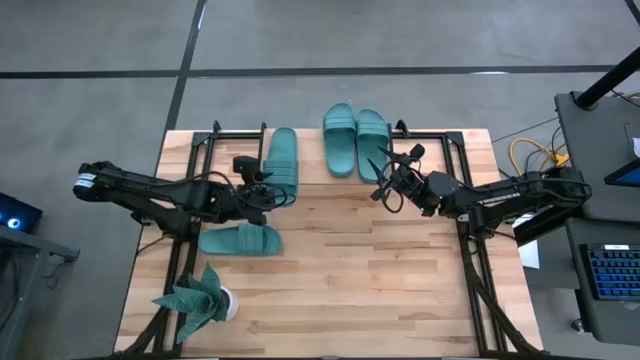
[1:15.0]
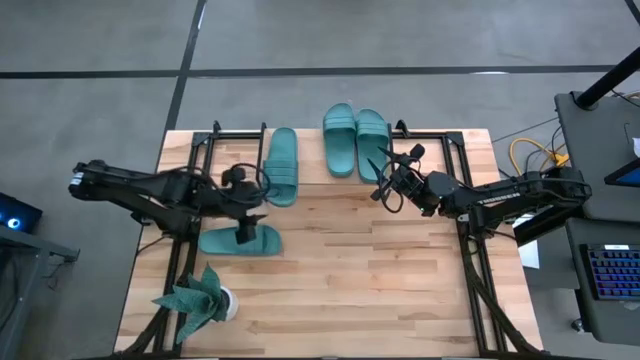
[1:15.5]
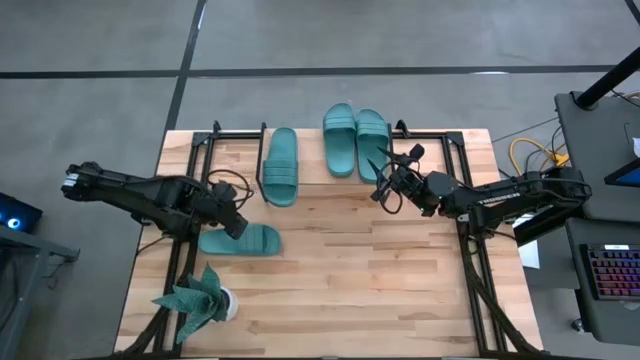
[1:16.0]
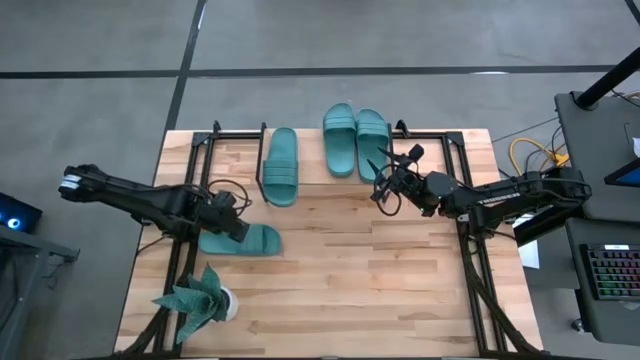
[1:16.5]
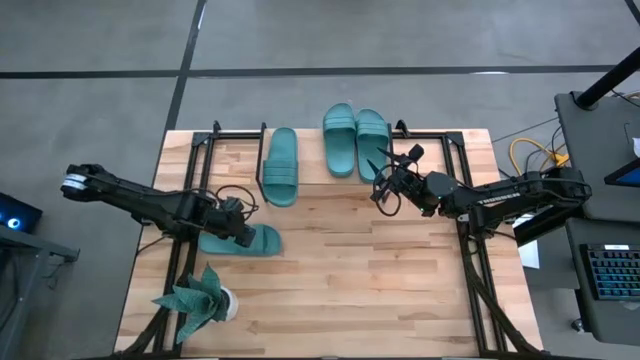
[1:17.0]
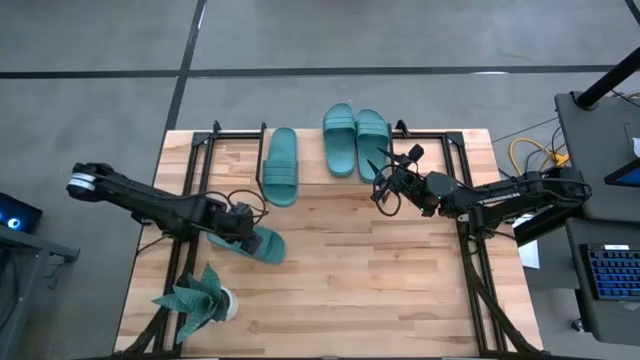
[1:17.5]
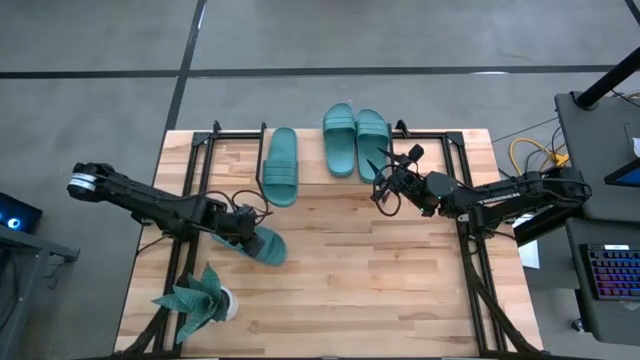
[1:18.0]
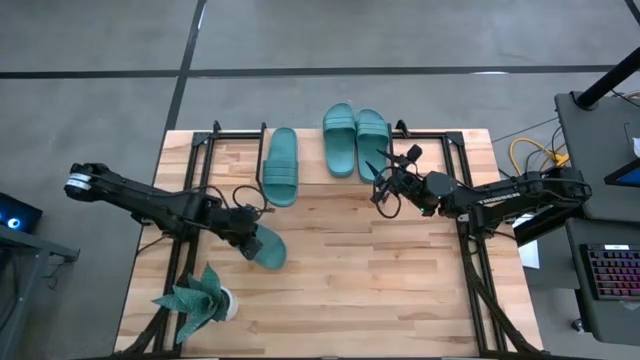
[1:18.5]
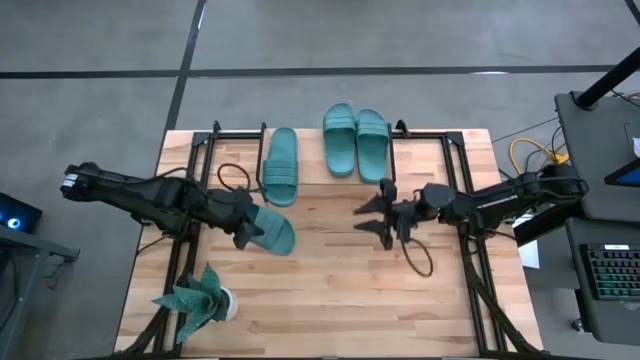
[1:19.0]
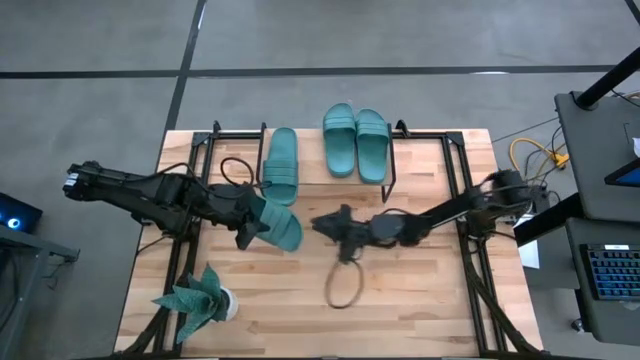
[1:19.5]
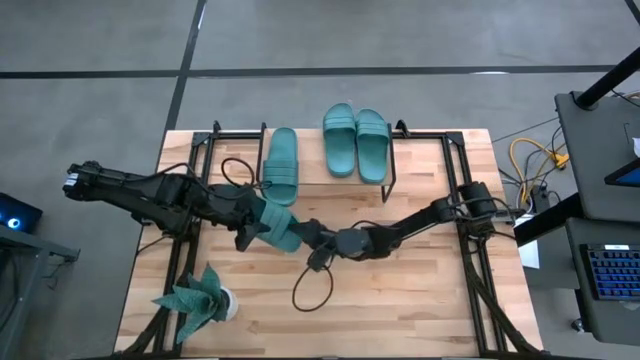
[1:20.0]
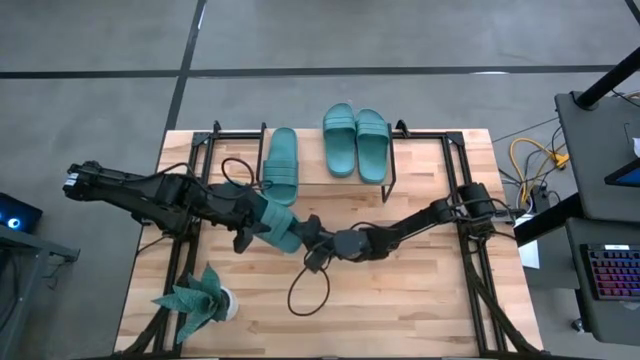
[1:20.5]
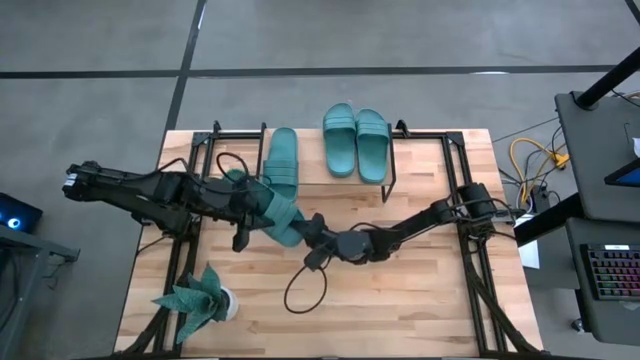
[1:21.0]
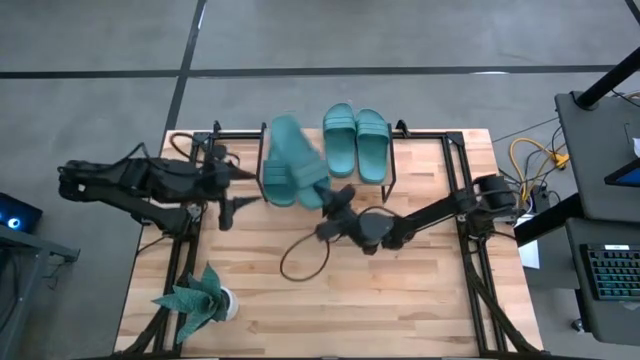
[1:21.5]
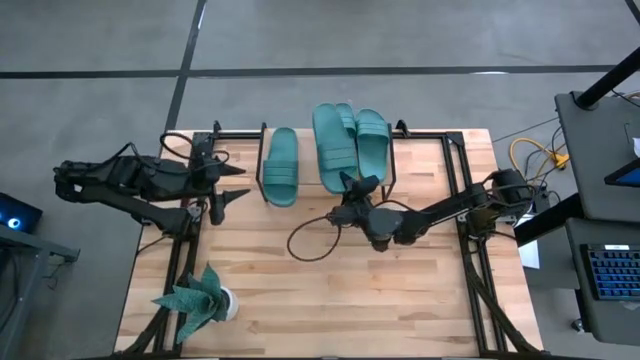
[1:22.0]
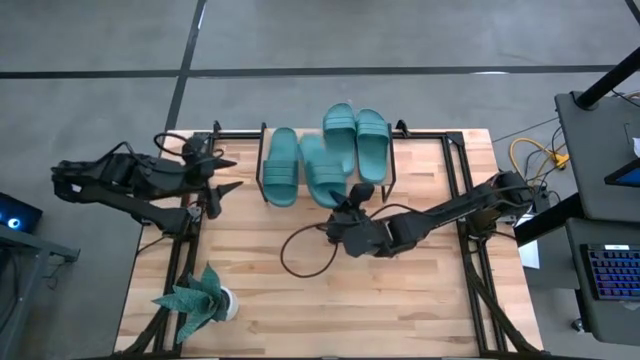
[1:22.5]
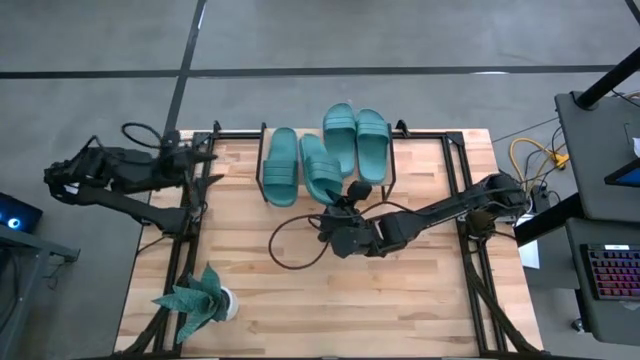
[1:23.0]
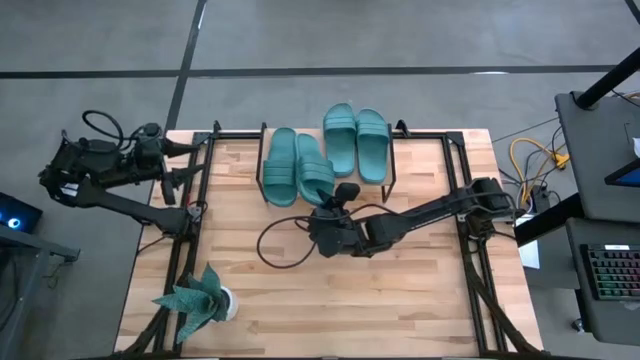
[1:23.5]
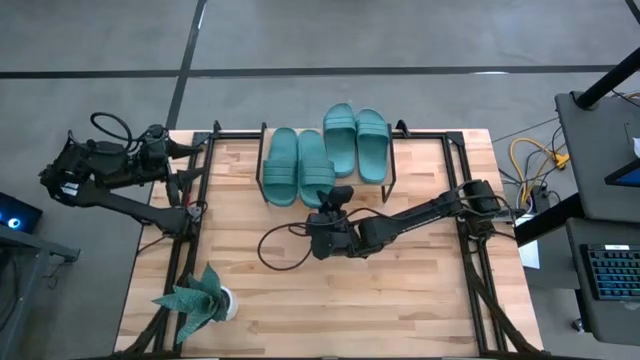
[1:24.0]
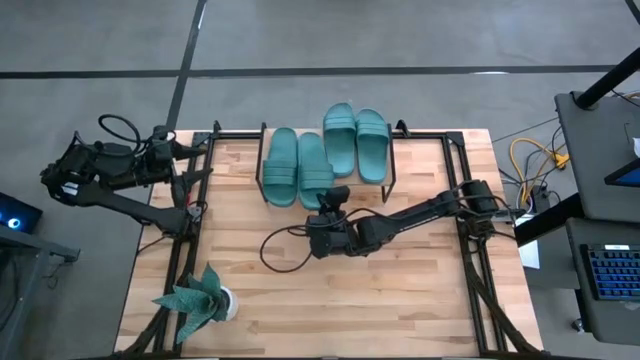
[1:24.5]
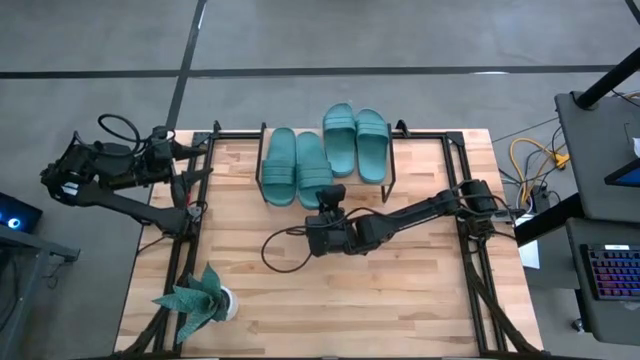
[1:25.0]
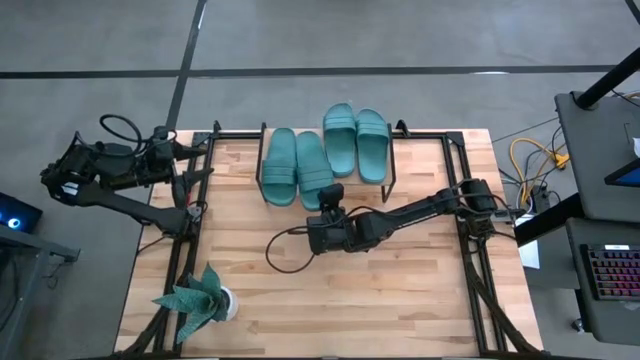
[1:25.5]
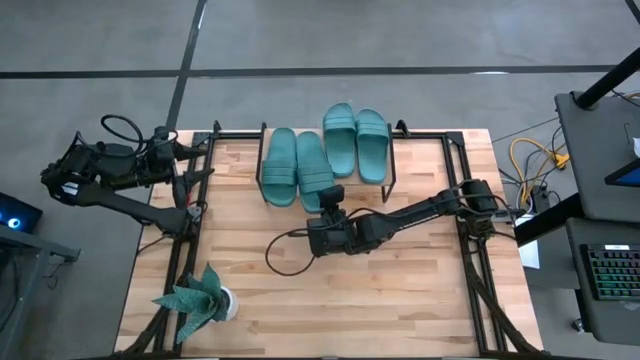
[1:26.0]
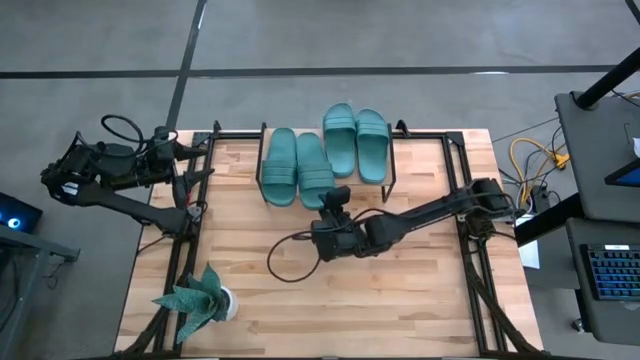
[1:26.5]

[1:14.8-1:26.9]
Task: Pick and place slides into the shelf
Put the green slide on the shelf

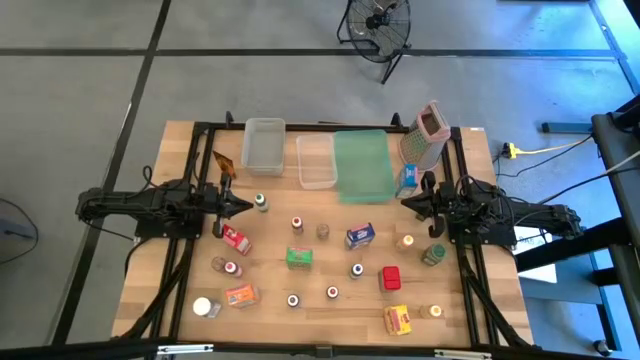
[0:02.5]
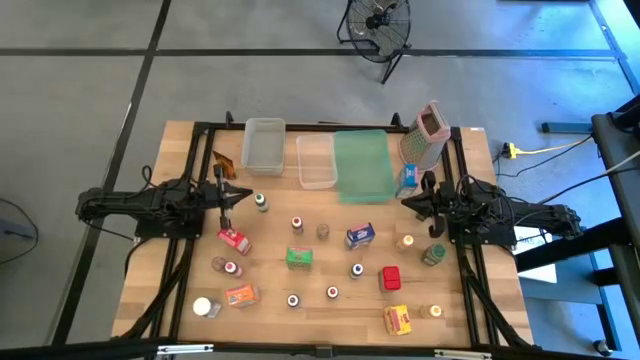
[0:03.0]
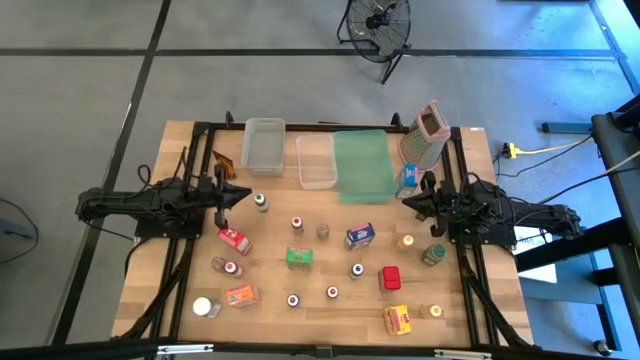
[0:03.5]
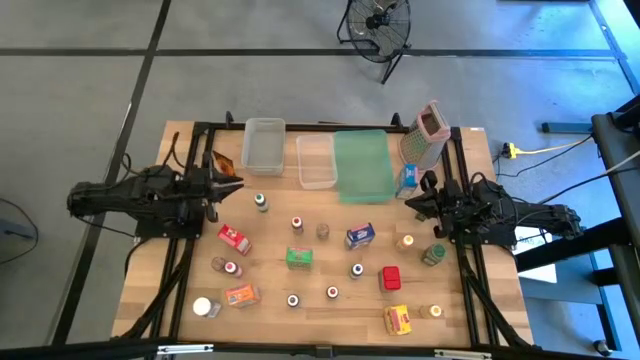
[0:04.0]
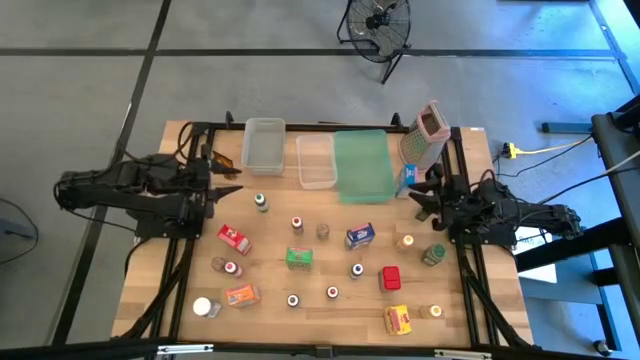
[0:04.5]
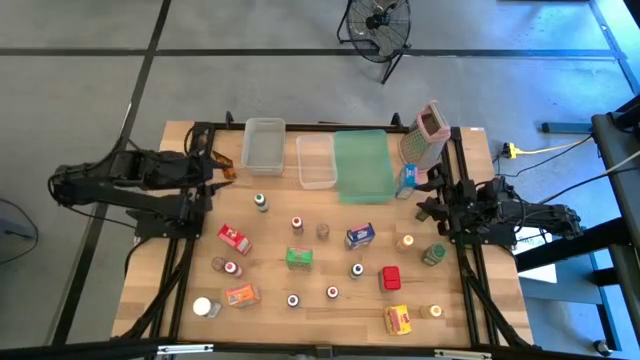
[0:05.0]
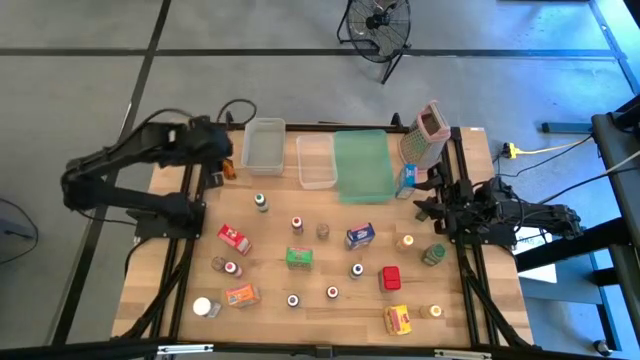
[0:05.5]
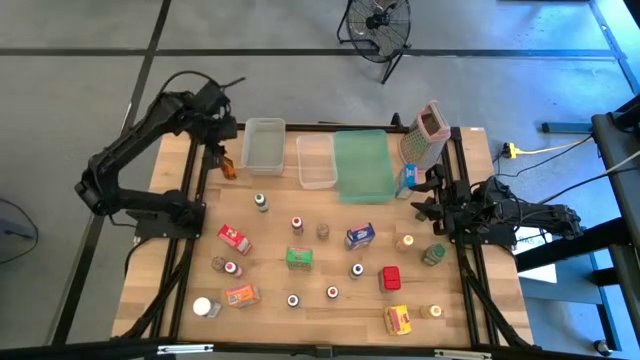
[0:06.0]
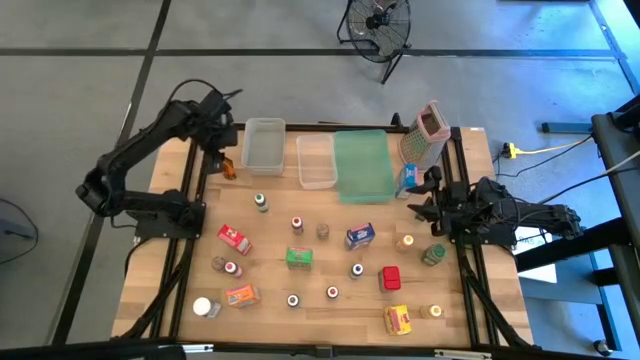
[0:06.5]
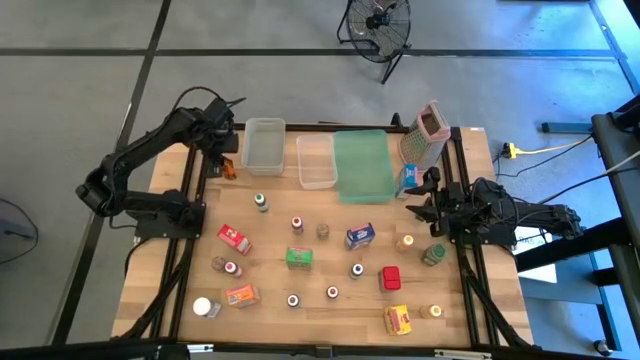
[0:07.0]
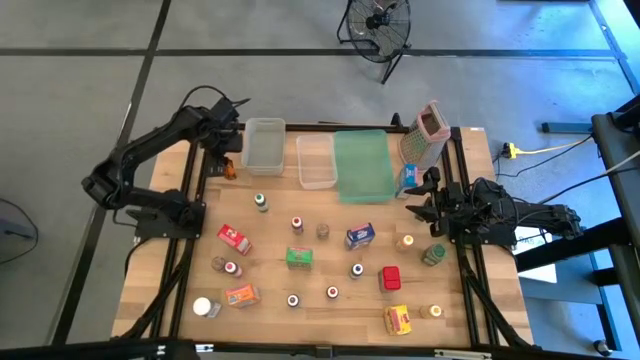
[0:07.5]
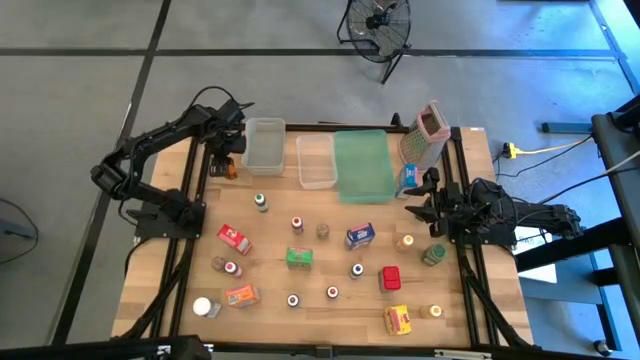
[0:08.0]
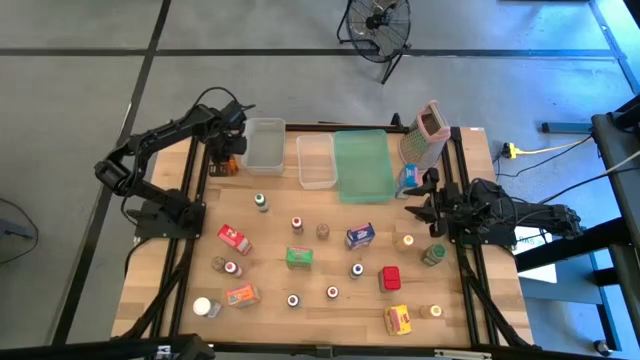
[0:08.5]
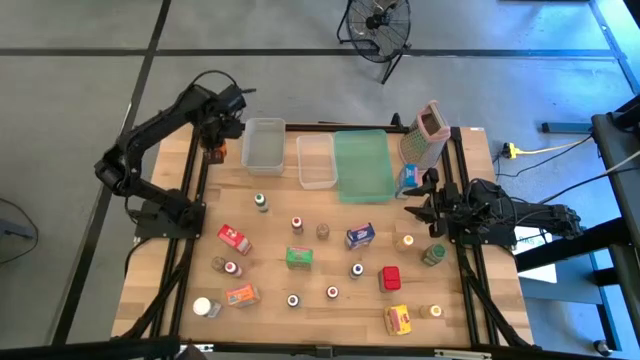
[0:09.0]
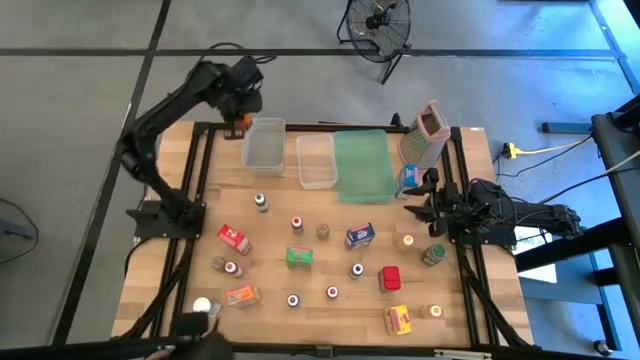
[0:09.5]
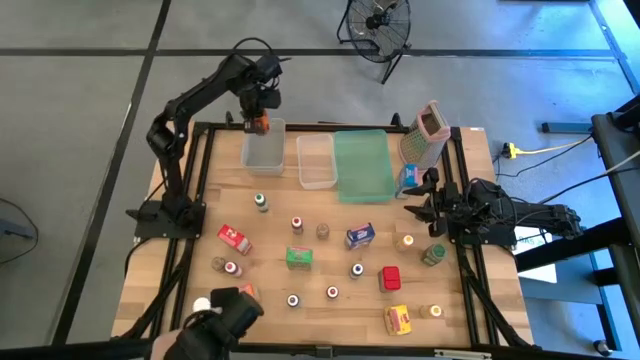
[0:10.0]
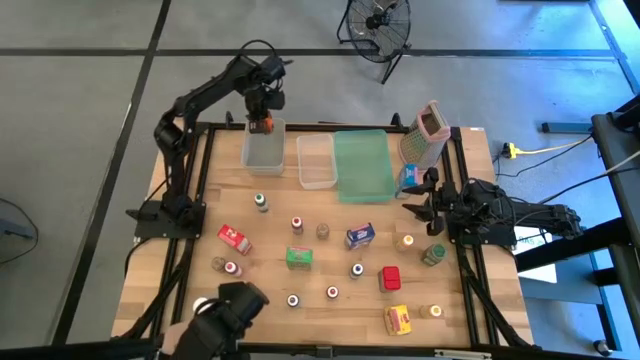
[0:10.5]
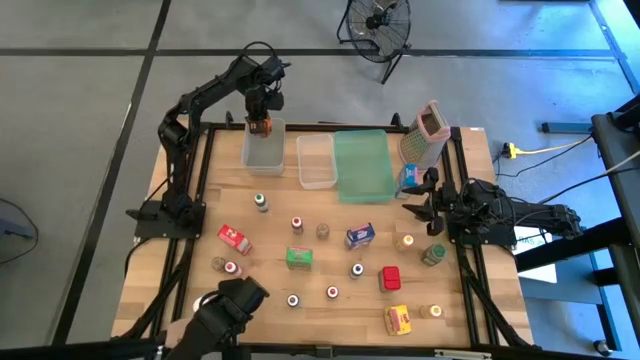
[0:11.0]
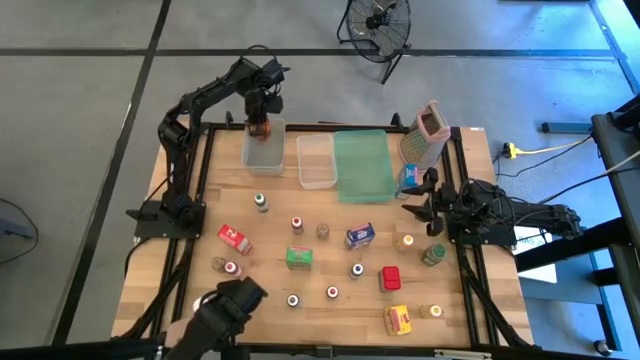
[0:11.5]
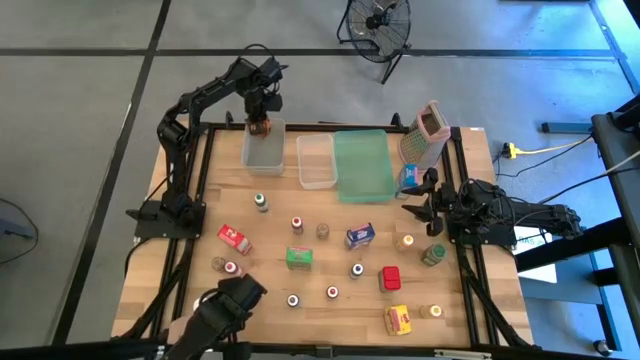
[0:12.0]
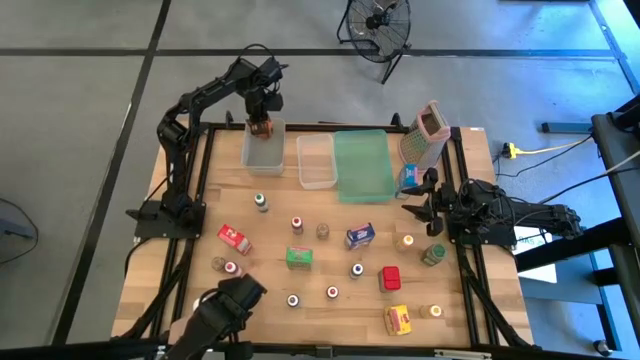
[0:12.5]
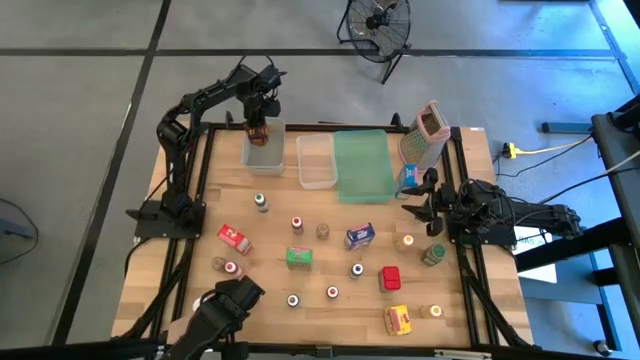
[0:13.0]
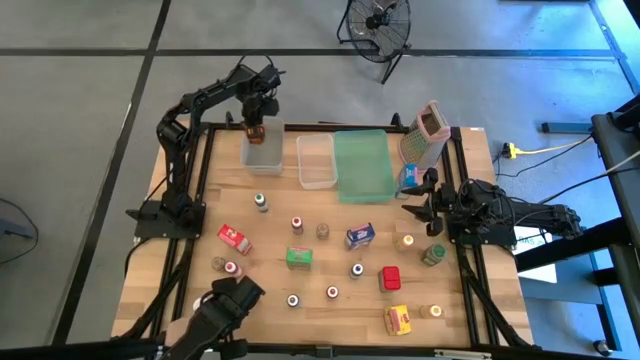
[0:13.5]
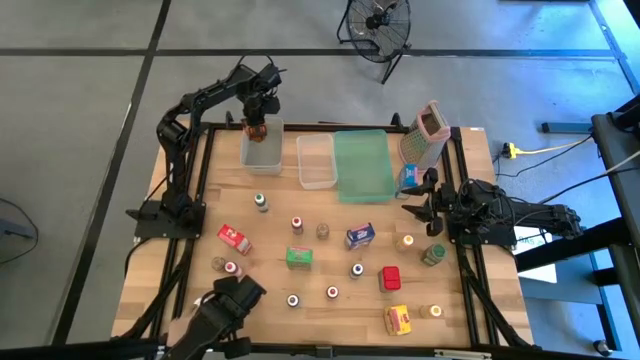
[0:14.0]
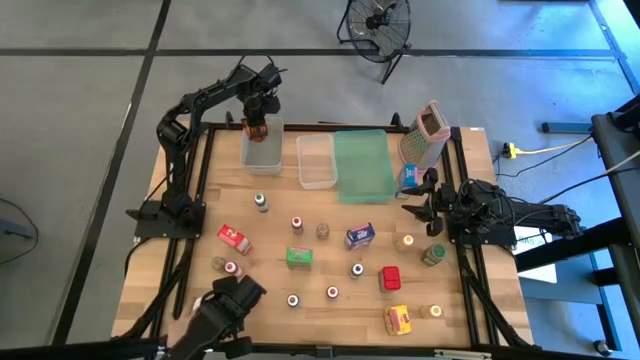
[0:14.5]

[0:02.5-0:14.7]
Task: Pick & Place Kitchen Items
Put the orange seasoning pack into the gray bin
